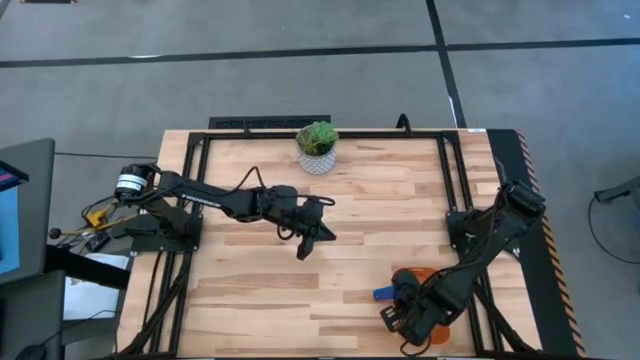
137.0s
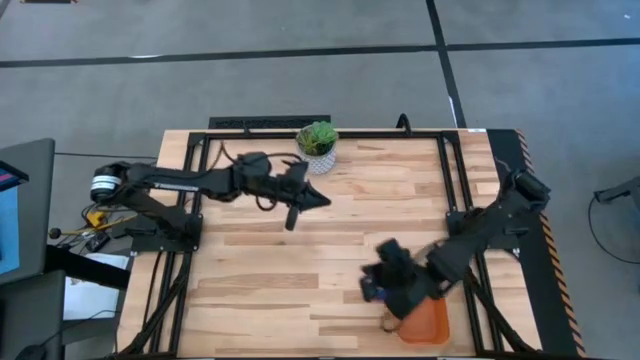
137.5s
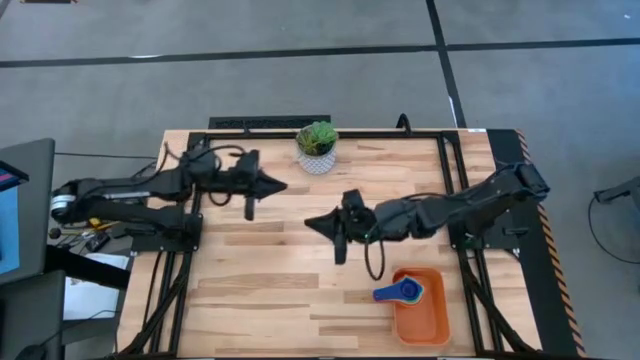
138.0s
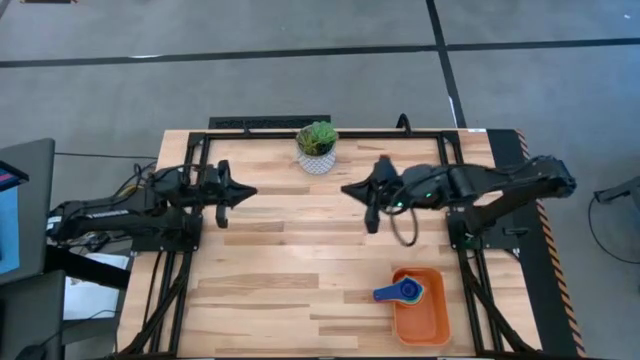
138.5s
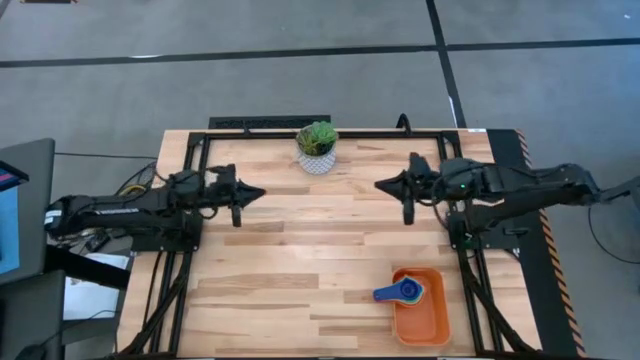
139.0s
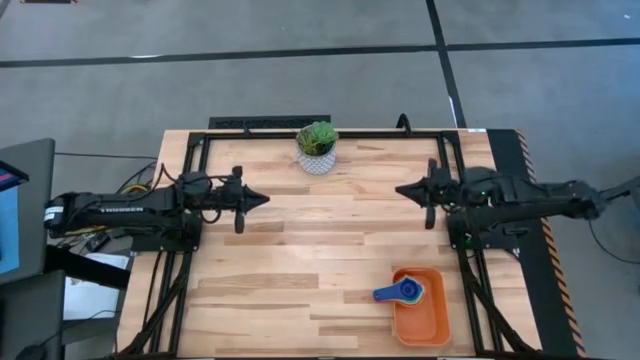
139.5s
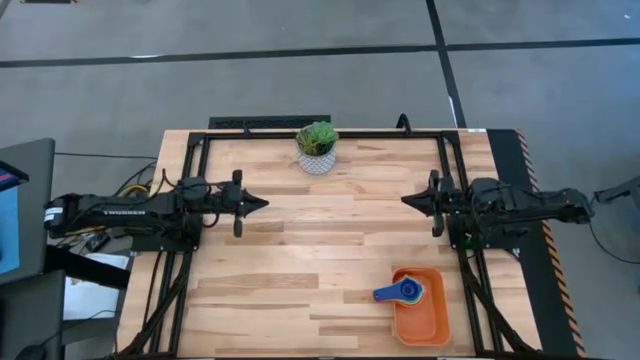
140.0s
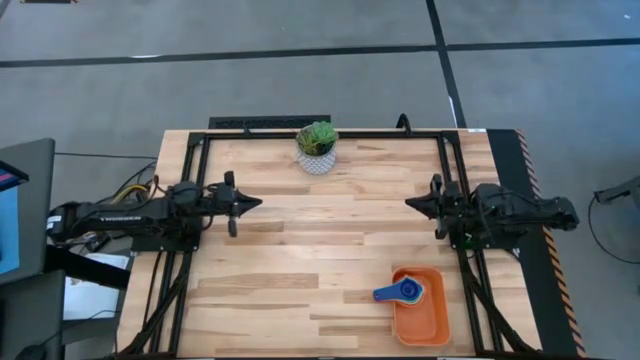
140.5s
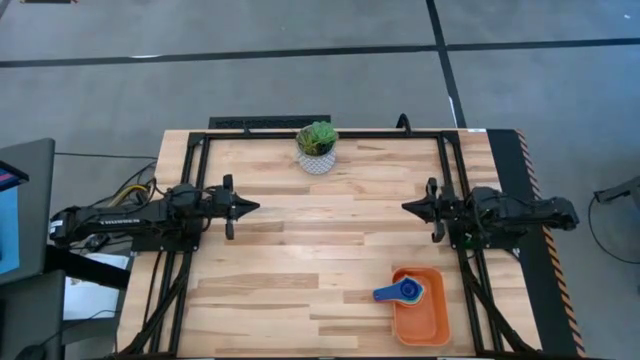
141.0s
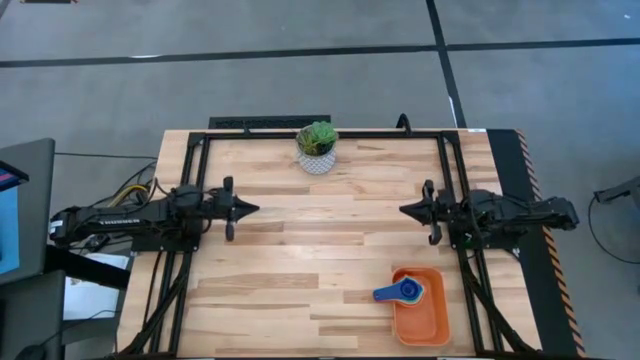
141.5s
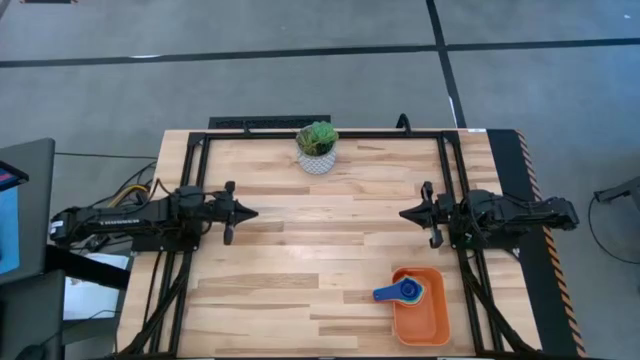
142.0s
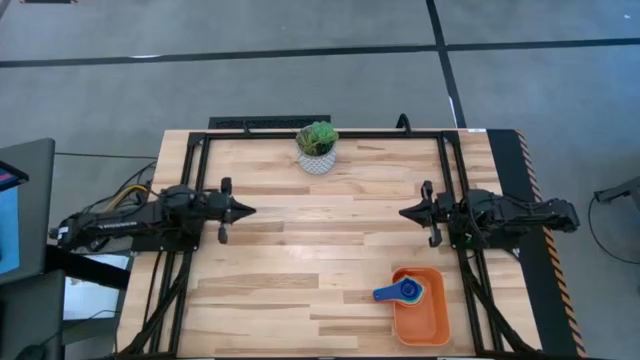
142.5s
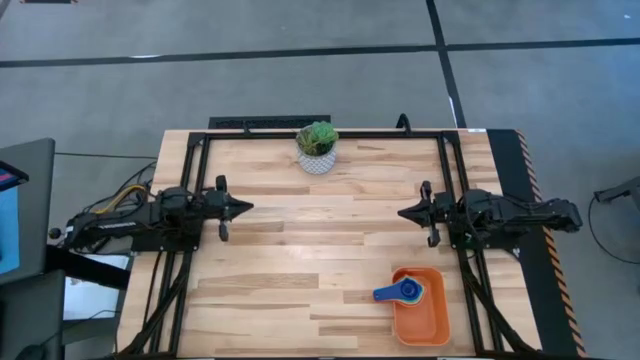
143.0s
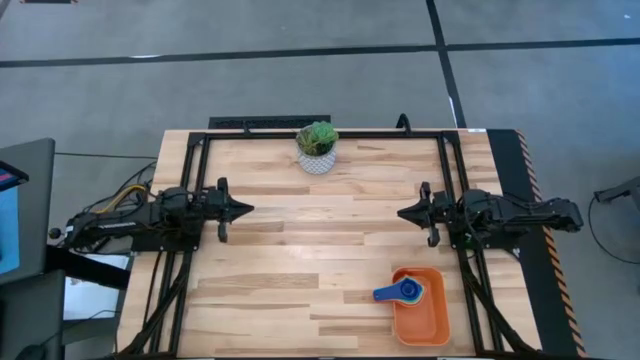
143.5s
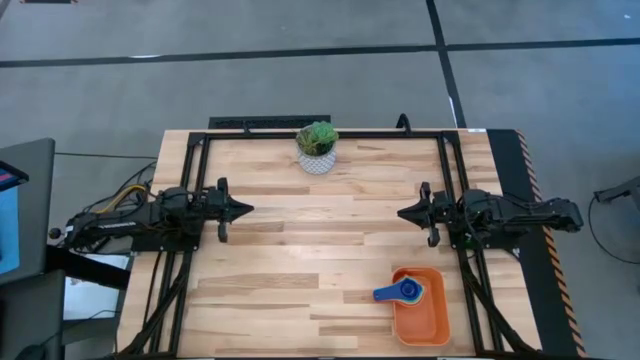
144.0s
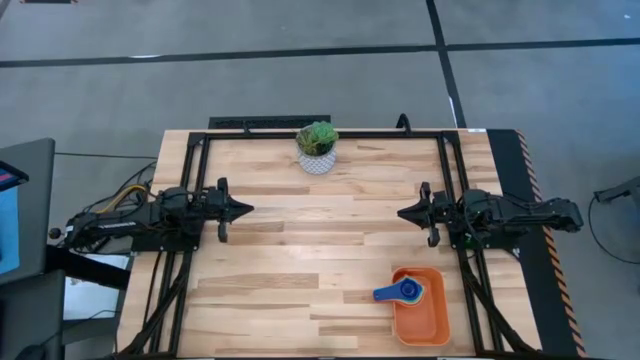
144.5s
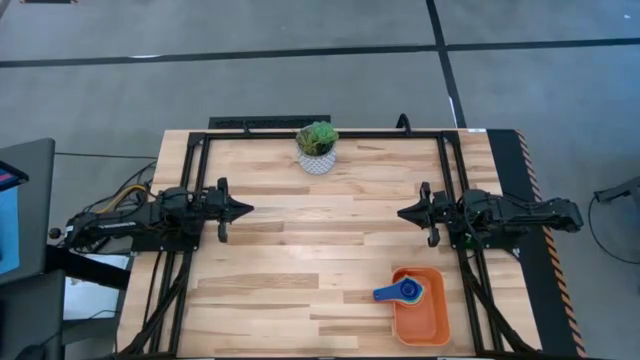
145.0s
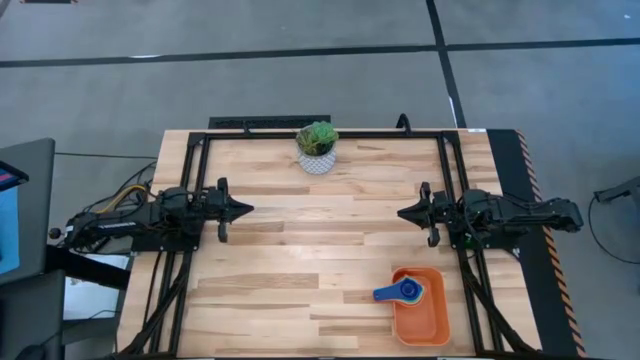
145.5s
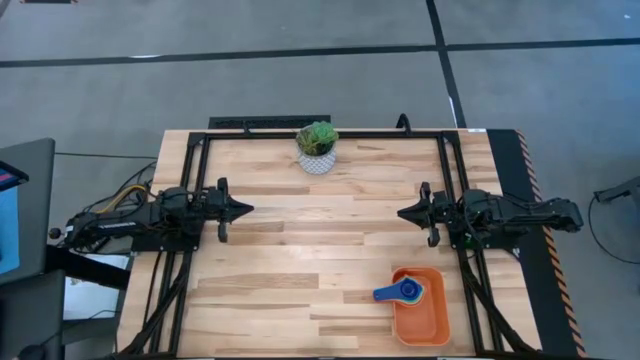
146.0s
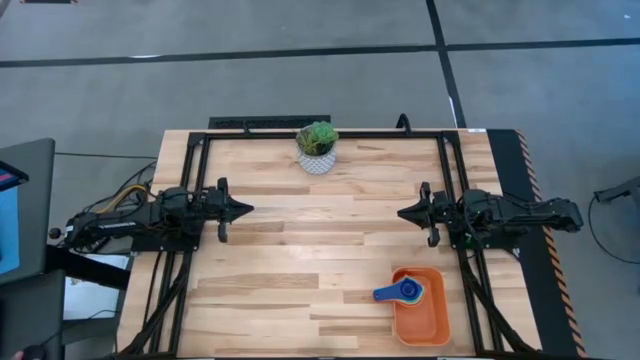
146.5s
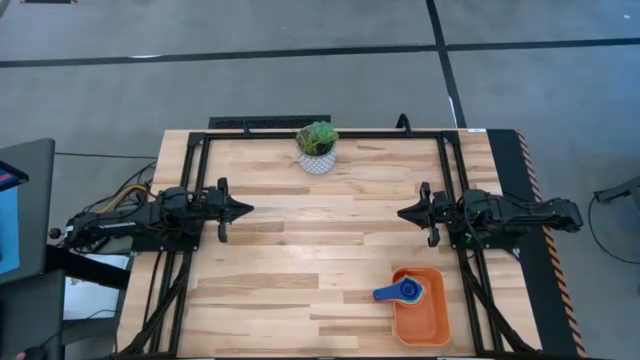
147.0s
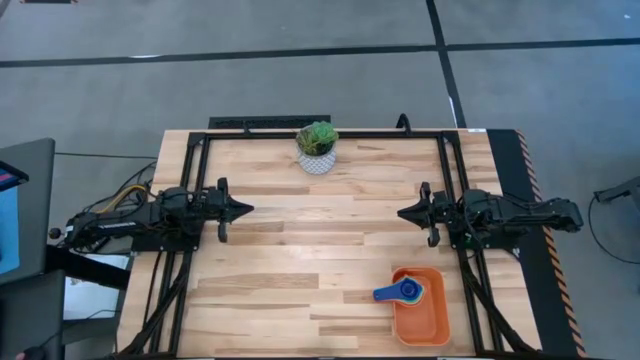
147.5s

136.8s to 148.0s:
Task: Nest measuring cups in basket
Return to Home Position

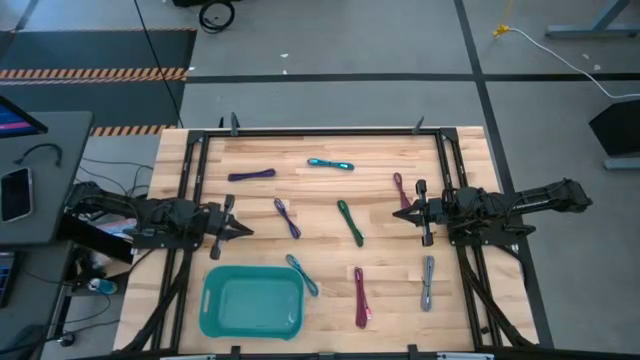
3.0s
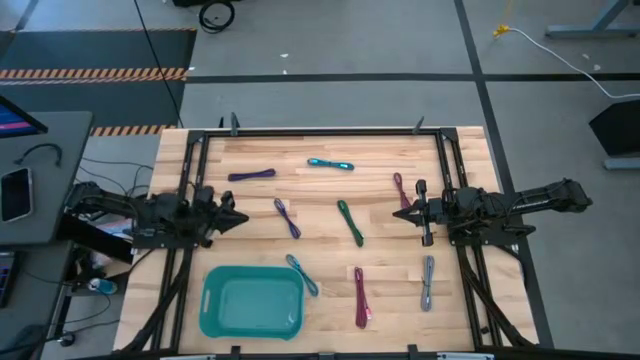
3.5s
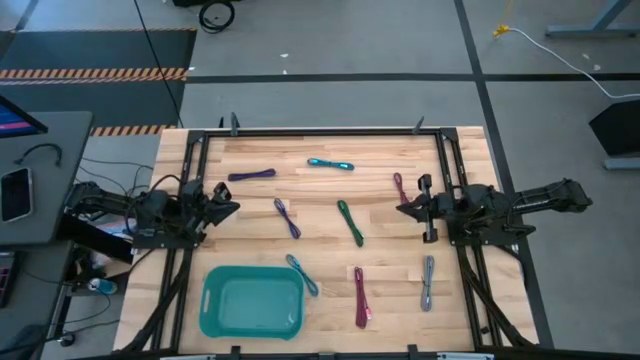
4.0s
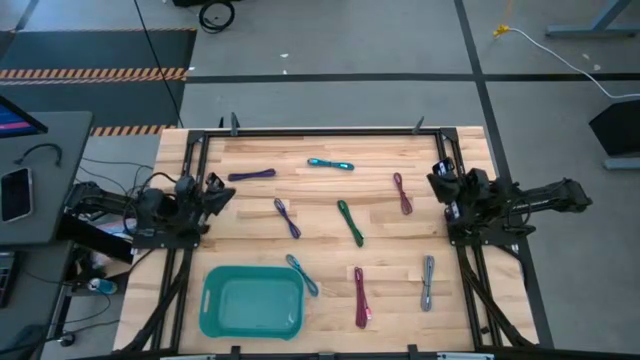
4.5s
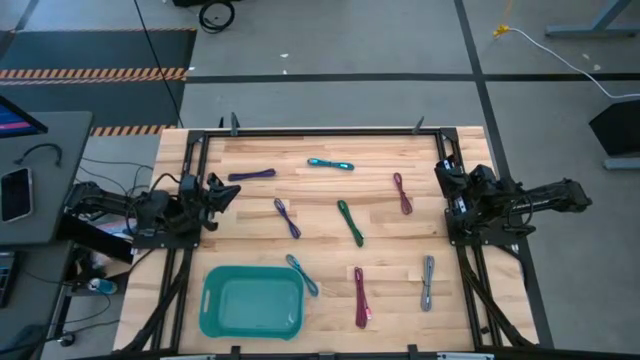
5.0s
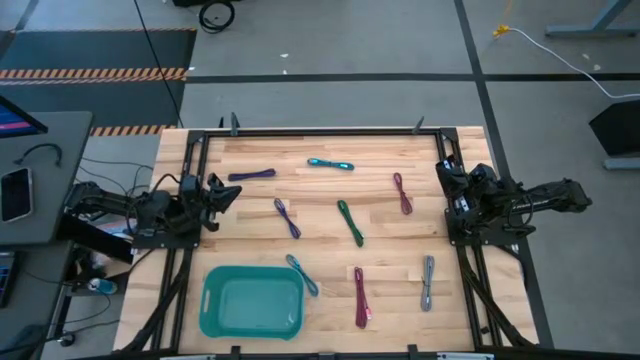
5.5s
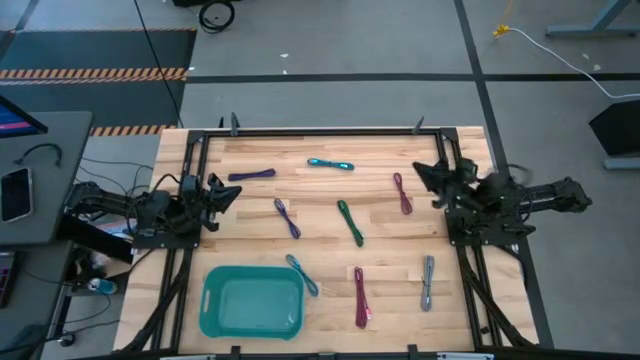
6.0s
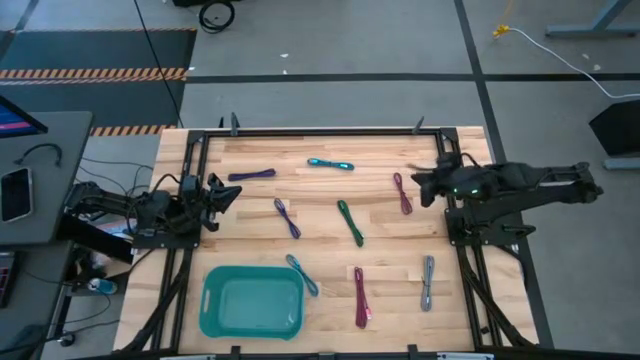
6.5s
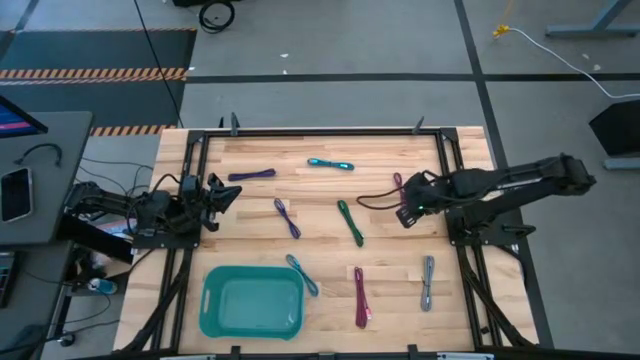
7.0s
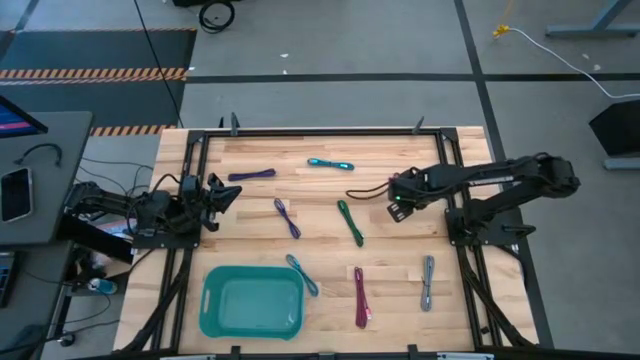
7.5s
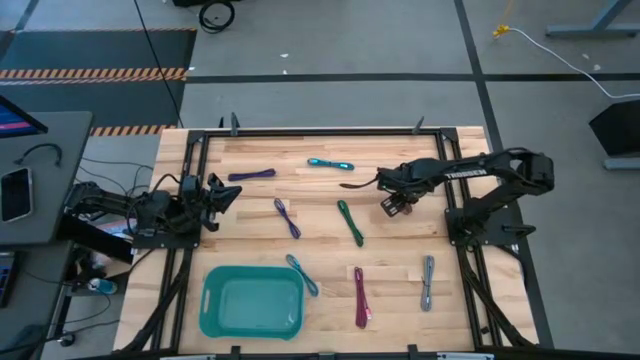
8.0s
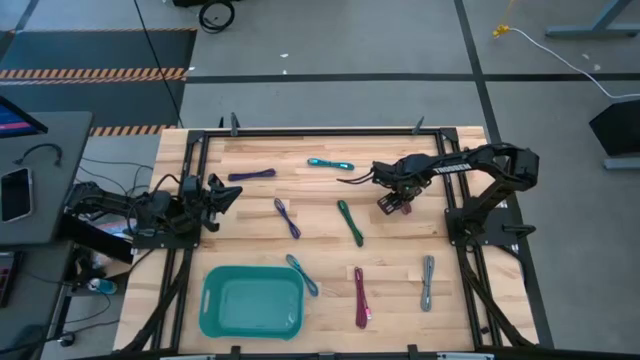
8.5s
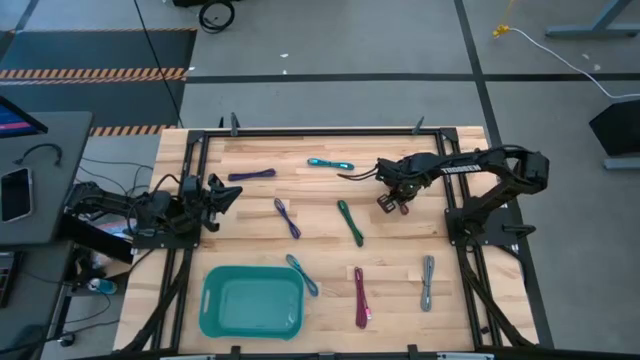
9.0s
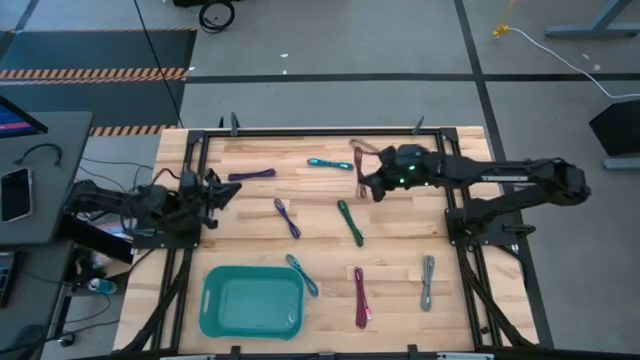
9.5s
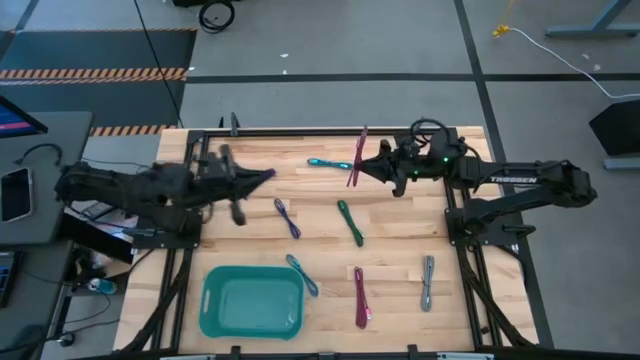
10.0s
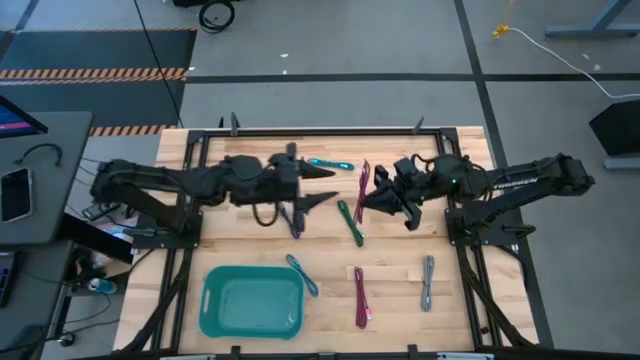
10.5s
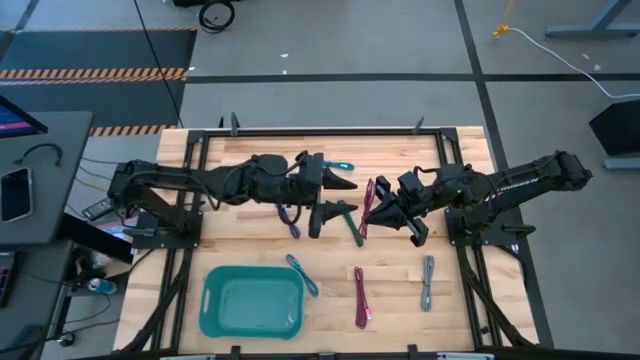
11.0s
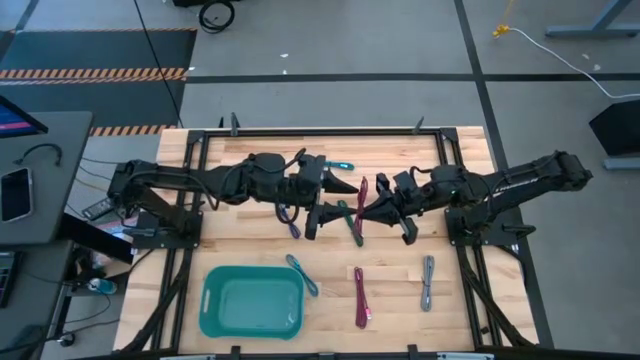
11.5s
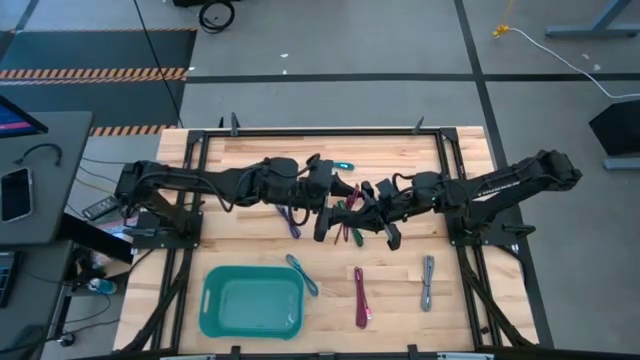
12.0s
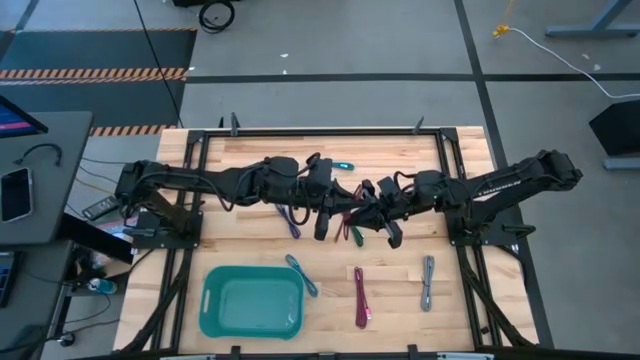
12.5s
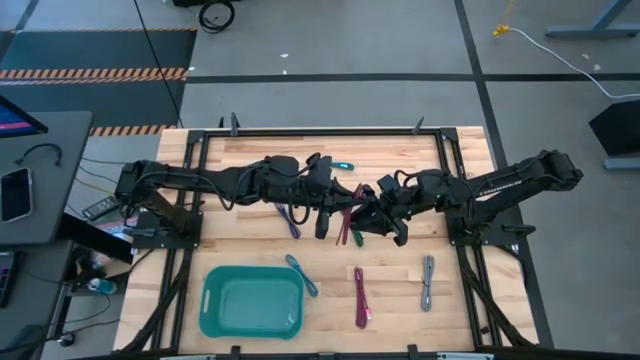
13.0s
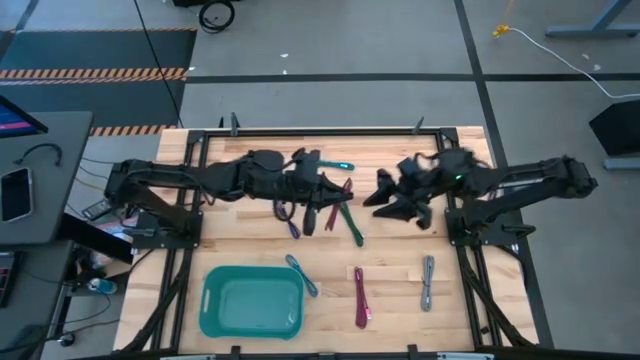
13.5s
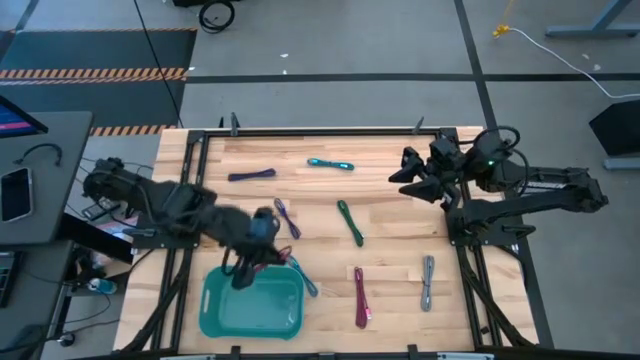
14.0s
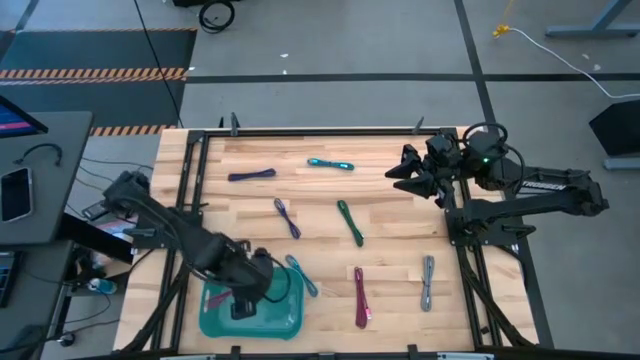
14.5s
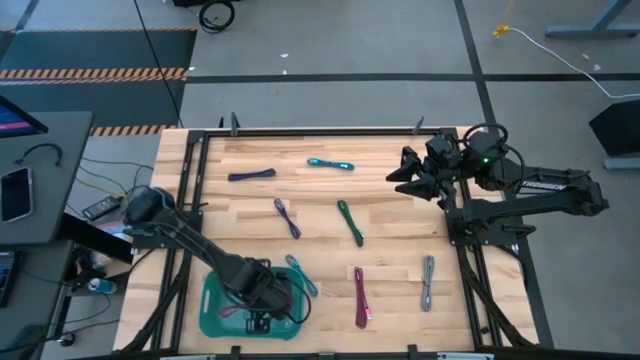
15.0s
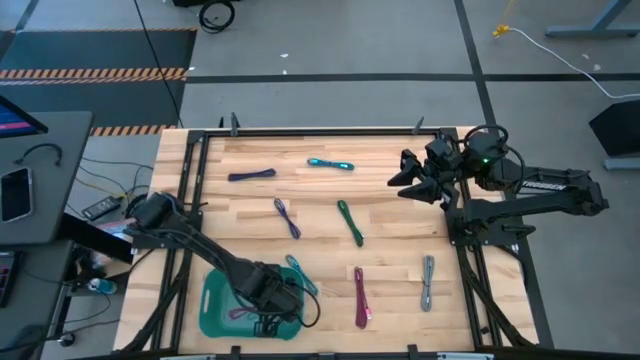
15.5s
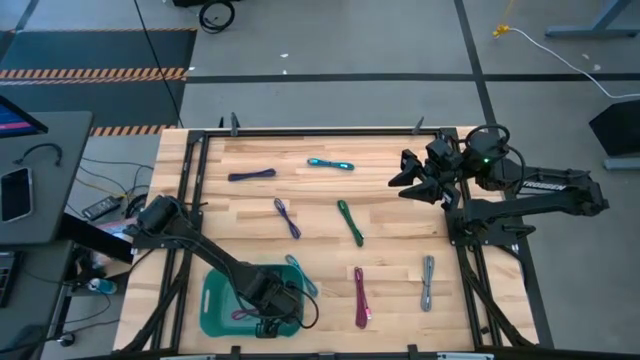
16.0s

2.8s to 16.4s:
Task: Pick and place USB-C Cables
Put the top pink charger cable into the green bin
